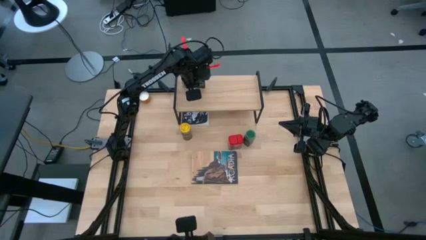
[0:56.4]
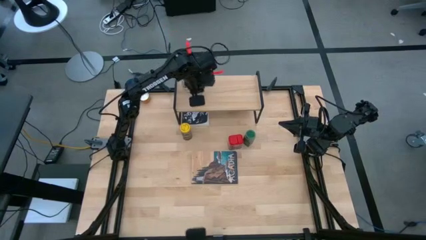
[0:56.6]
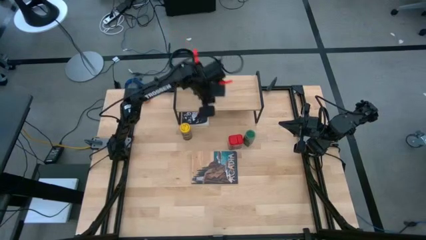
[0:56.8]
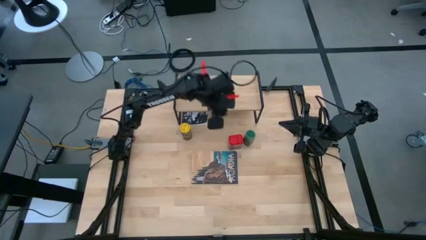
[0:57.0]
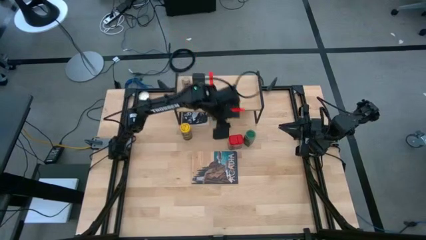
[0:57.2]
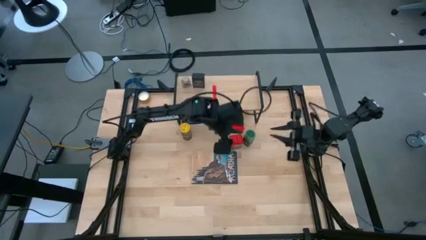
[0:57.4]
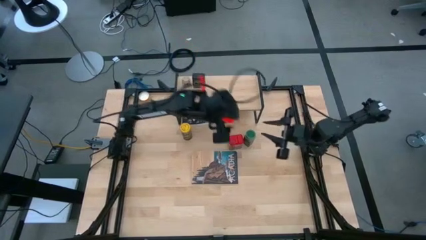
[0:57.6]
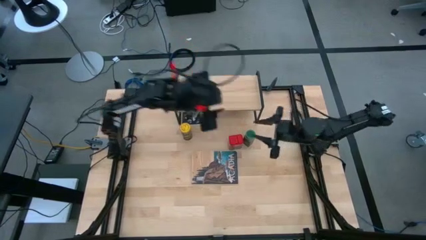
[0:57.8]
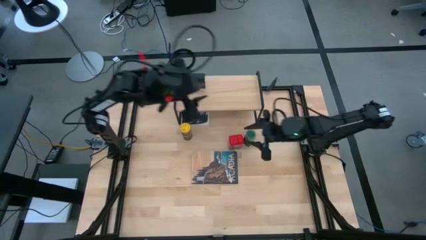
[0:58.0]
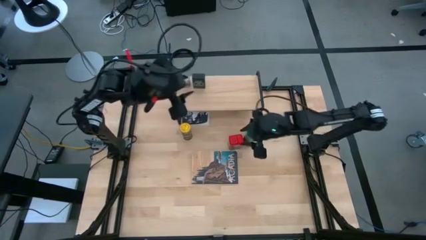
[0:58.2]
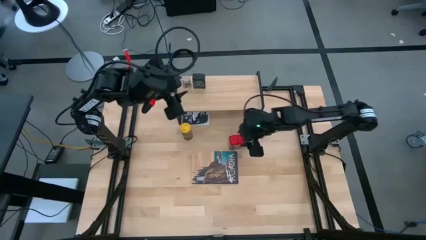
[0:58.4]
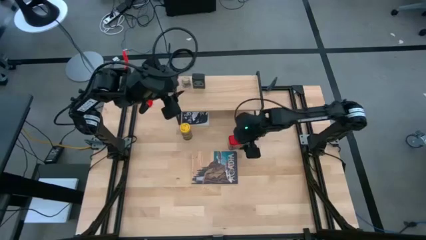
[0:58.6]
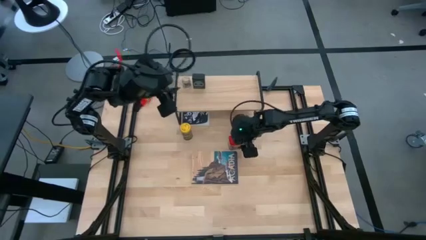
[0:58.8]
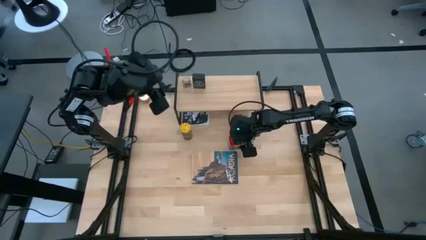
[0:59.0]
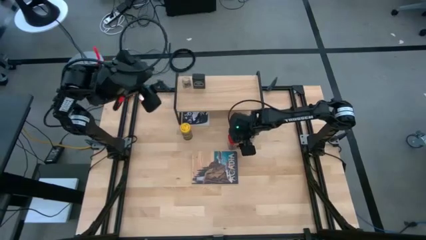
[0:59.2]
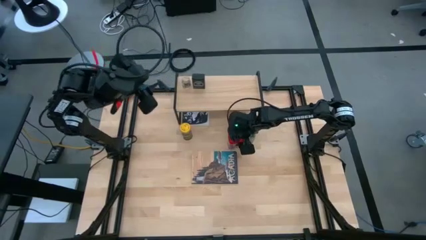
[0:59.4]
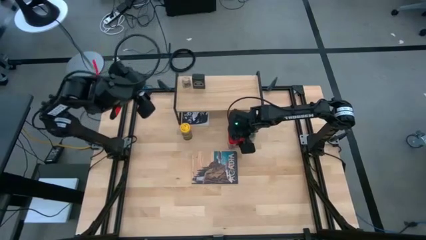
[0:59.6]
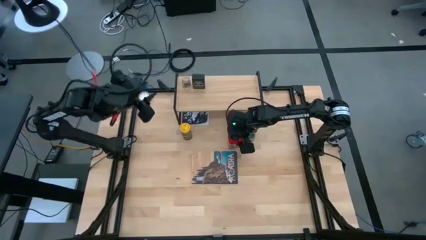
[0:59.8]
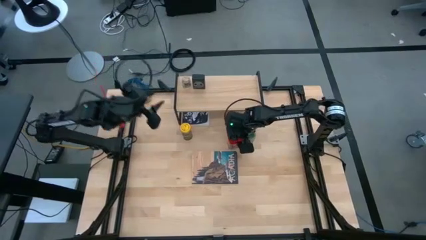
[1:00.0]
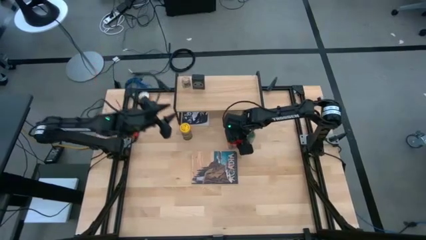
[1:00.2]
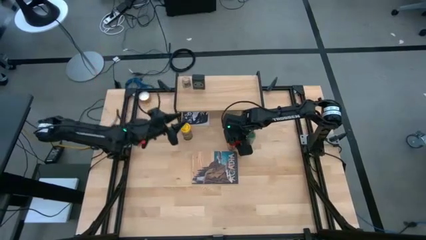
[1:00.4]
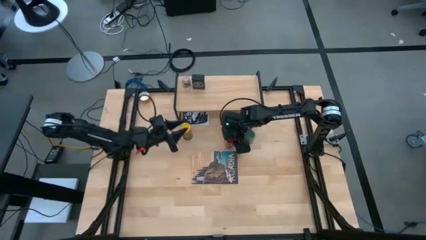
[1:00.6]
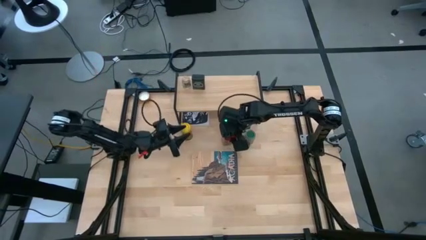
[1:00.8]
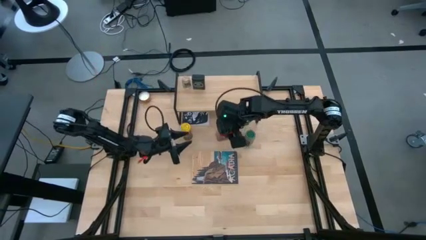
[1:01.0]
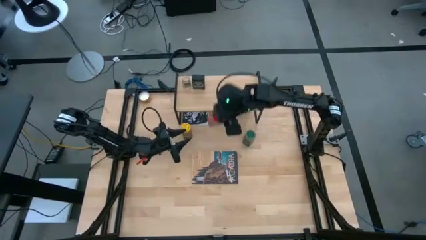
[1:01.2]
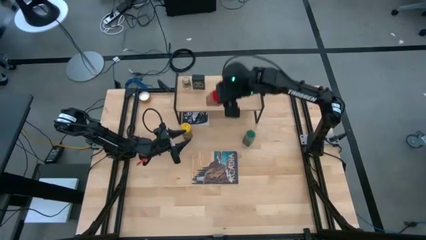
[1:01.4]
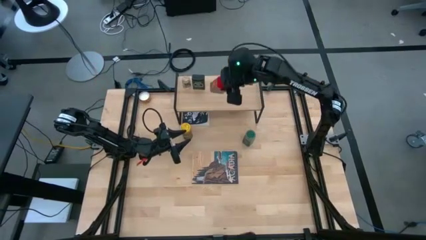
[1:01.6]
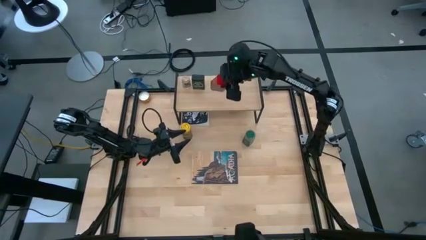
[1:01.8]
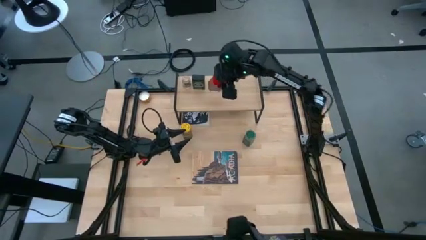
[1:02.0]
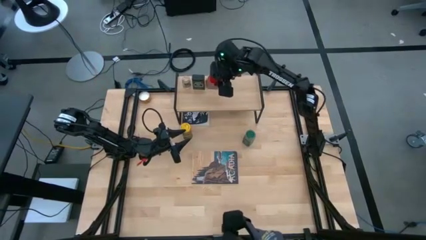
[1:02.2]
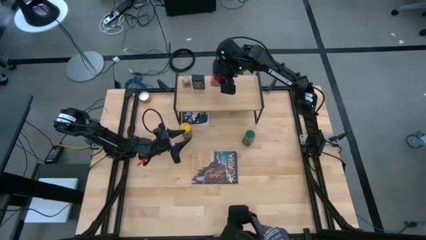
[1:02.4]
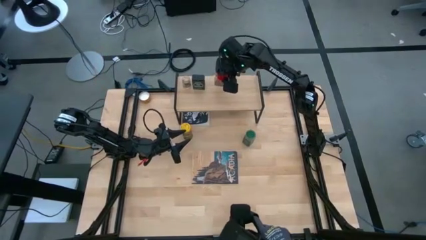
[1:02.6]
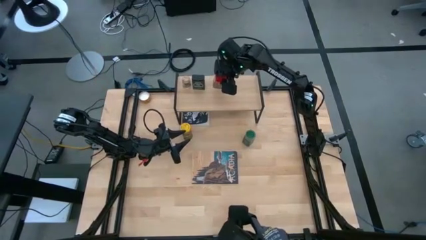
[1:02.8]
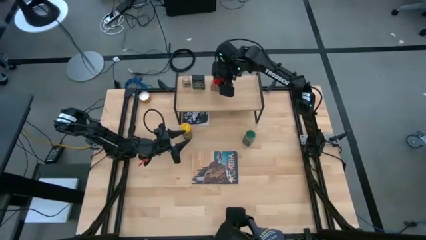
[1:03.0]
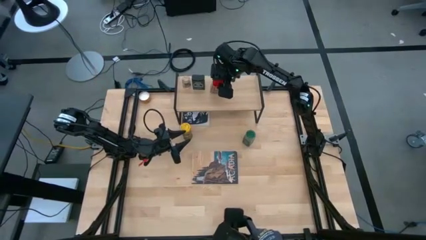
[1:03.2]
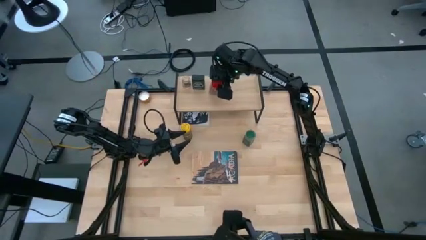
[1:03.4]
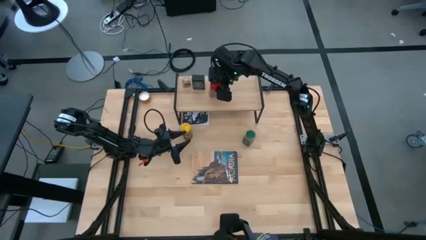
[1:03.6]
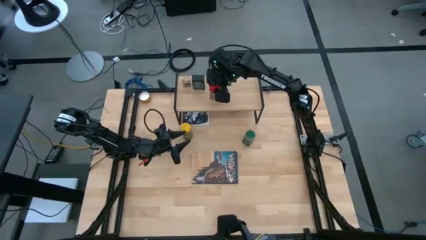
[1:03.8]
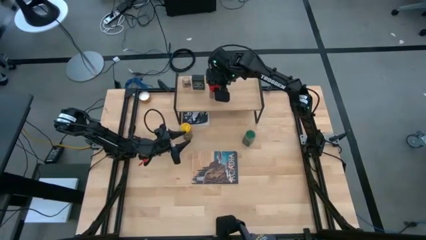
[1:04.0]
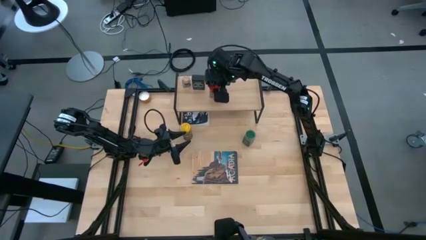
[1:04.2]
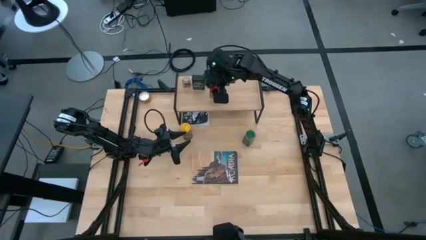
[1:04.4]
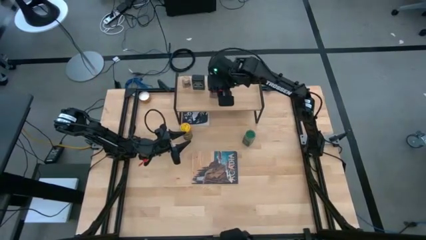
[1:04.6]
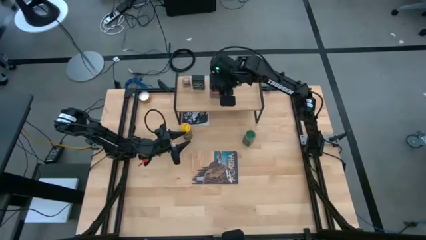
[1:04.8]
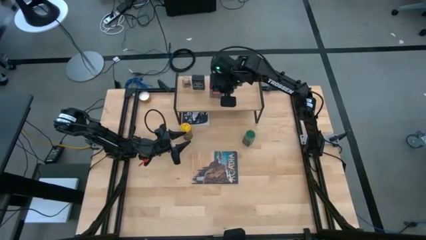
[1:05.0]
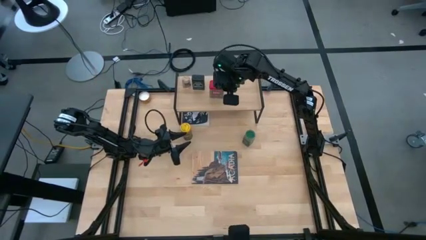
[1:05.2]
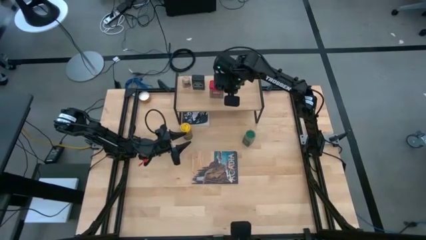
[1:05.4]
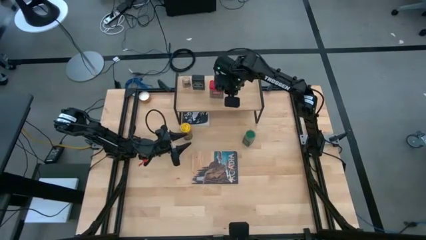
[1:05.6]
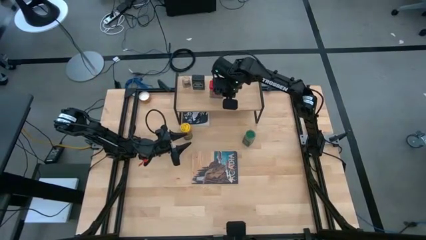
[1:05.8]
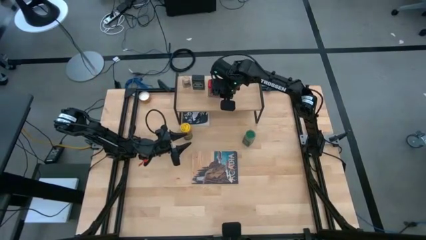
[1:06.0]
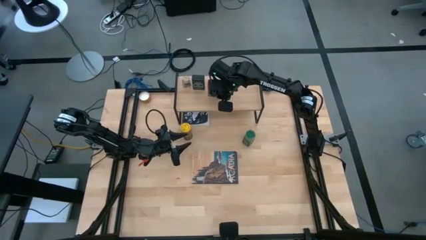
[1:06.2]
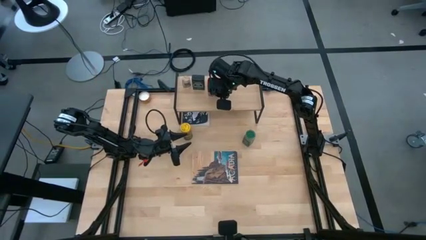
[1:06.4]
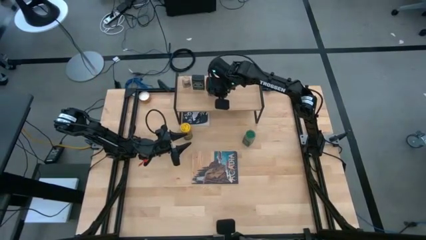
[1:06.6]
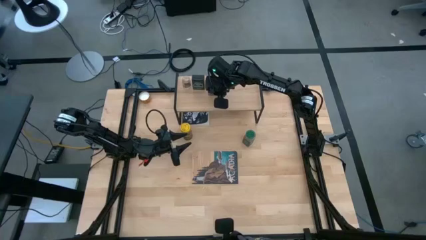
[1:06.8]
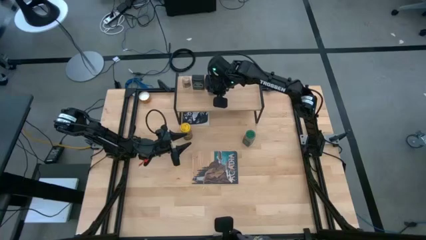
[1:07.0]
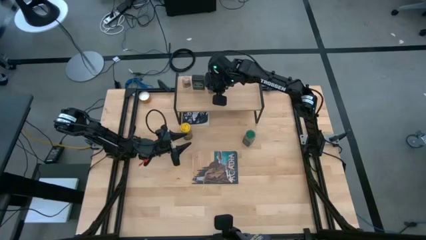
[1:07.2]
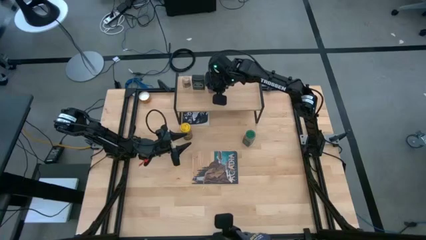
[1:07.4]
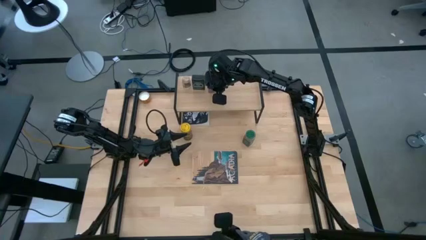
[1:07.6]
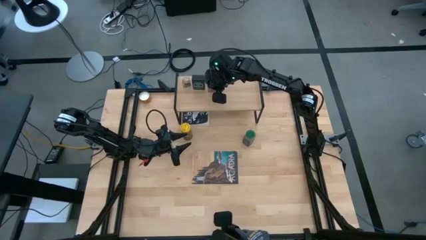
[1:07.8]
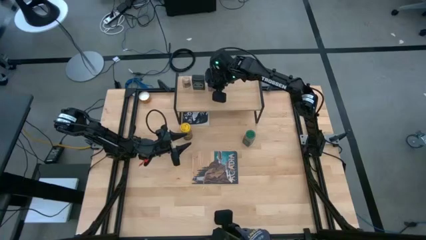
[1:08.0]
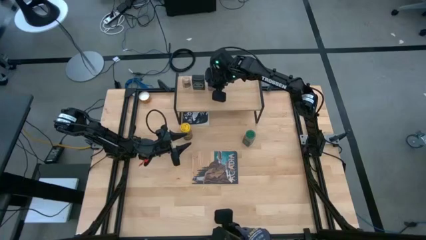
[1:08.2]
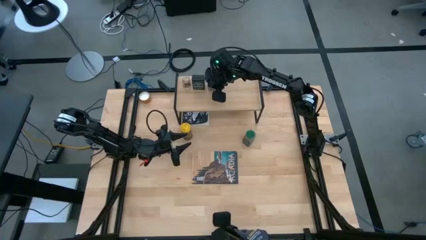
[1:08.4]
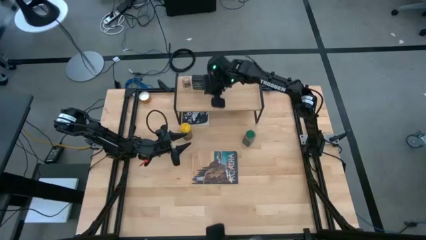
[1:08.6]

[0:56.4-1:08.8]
Task: Shelf spices
Put the red seasoning can on the shelf

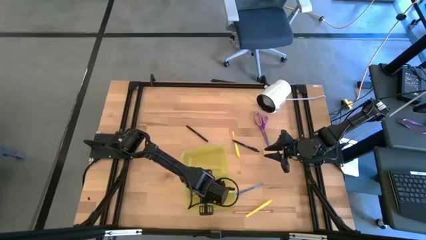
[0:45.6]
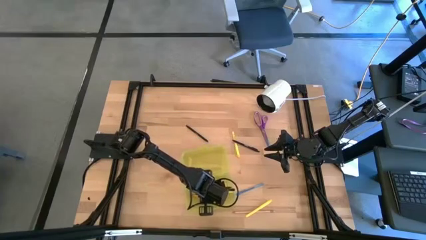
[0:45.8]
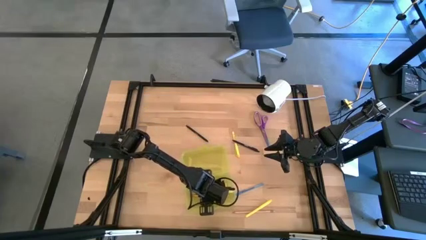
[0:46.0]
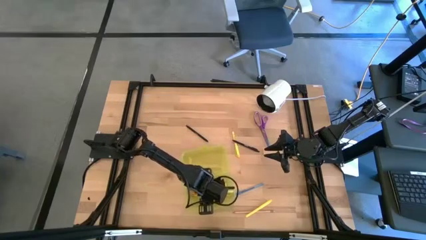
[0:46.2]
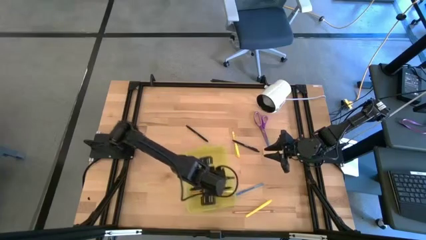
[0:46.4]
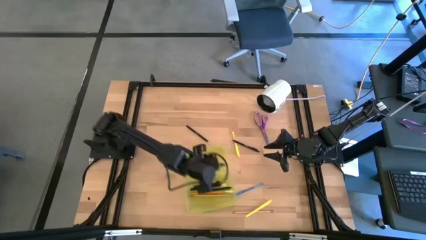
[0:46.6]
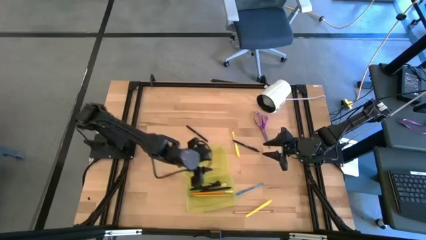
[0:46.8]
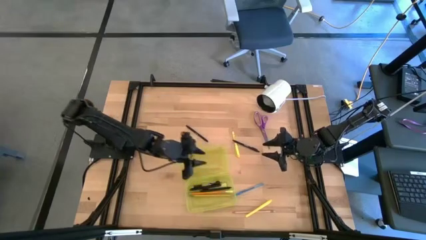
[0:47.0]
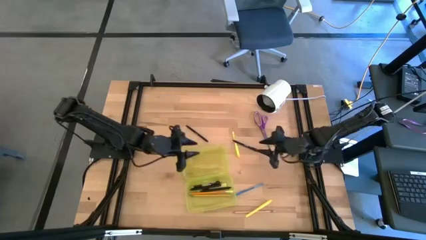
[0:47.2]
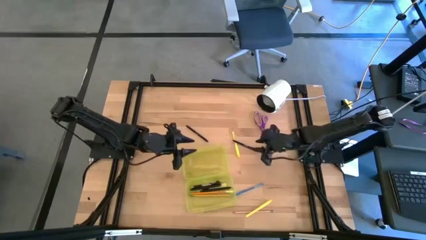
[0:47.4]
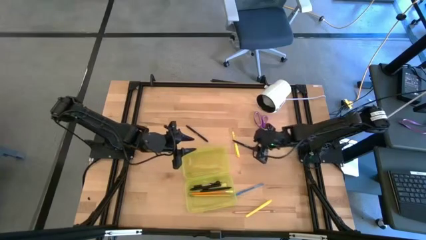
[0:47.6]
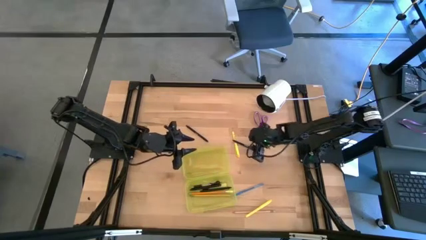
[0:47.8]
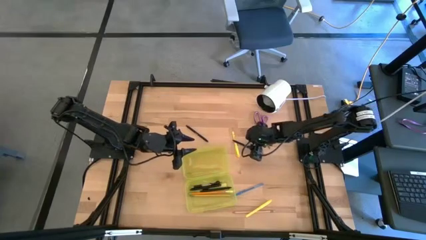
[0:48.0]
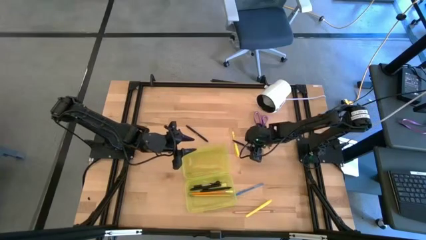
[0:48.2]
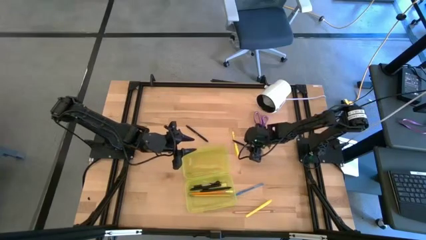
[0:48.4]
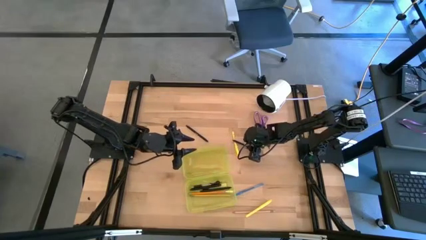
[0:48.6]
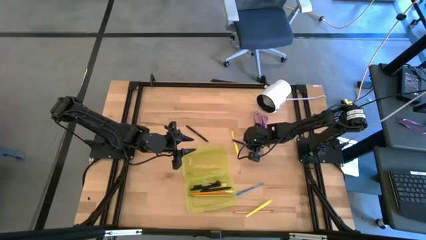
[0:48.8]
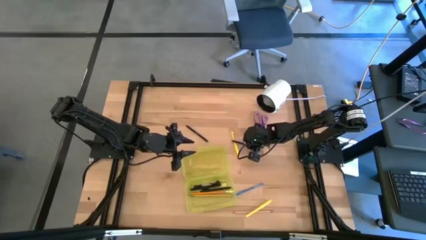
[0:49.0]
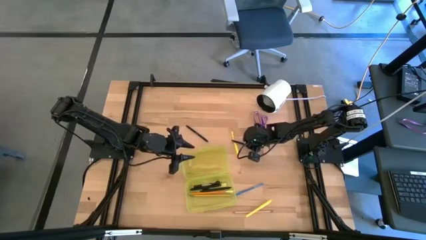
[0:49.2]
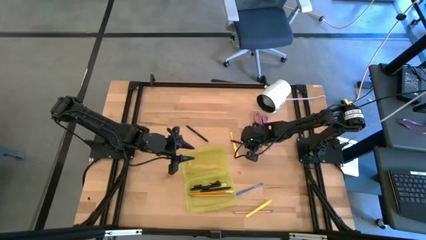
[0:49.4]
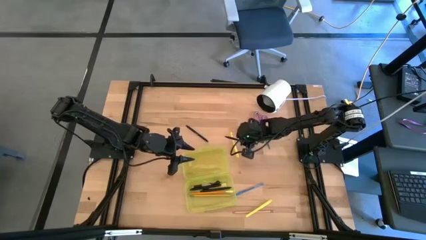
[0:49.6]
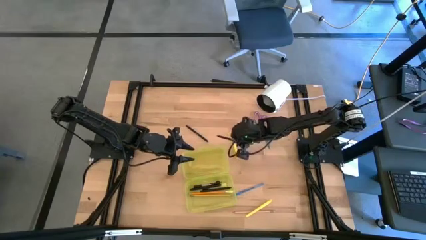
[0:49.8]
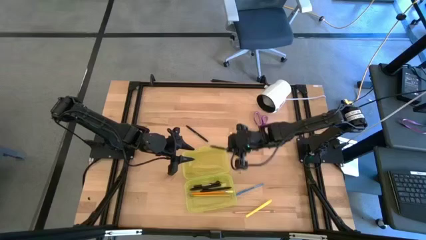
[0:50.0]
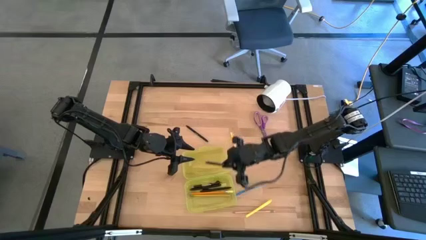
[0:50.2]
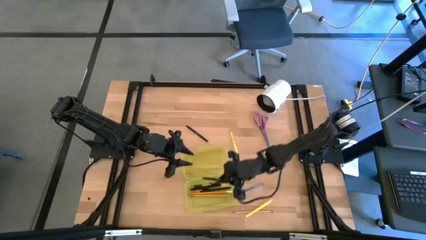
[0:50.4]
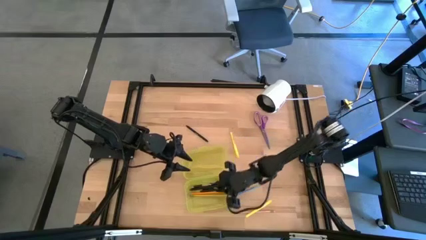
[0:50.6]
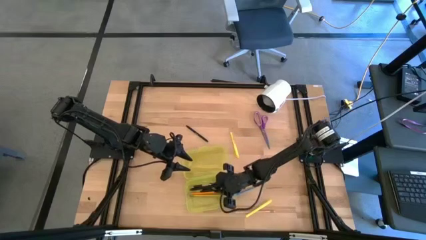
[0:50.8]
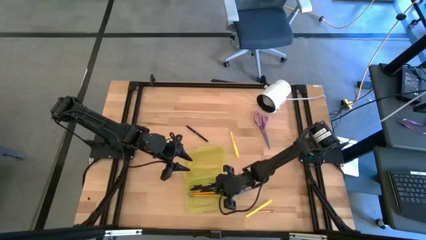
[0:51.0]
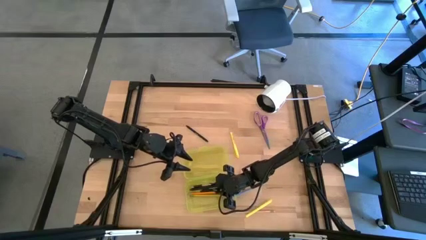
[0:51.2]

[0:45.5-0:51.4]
Task: Pick & place school supplies into a supply box
Put the black pen into the yellow supplies box
